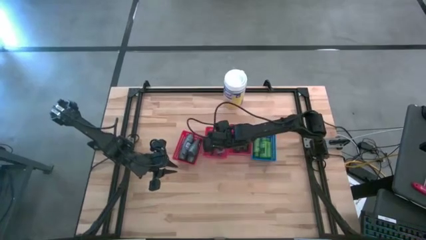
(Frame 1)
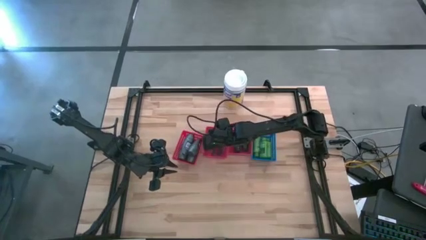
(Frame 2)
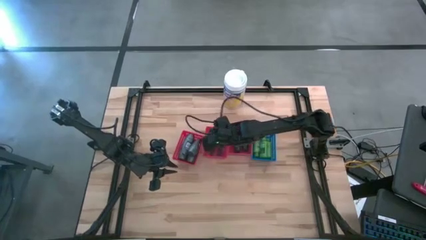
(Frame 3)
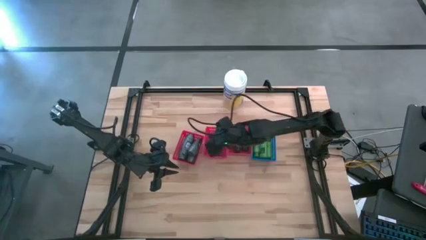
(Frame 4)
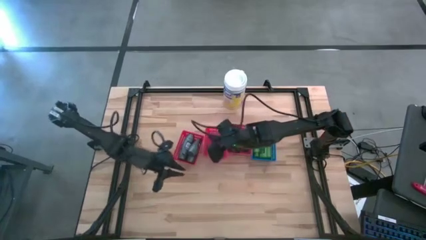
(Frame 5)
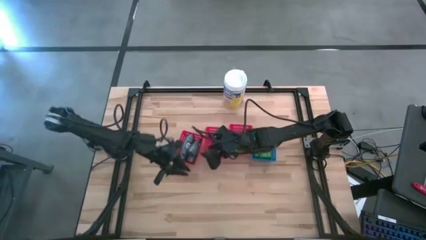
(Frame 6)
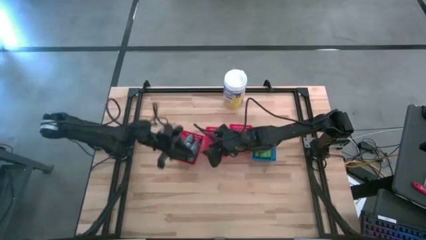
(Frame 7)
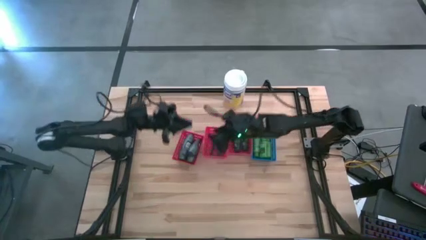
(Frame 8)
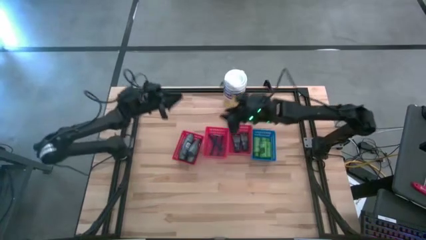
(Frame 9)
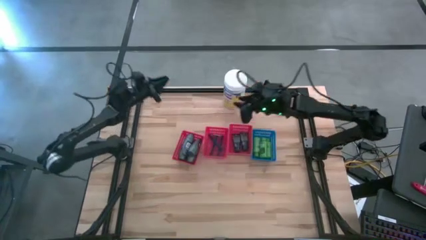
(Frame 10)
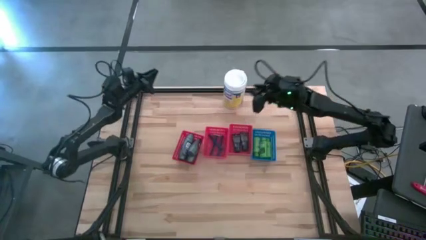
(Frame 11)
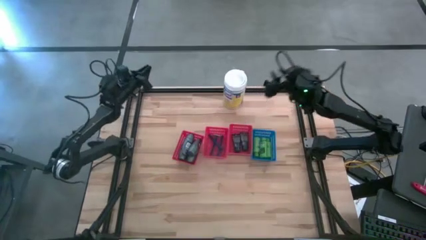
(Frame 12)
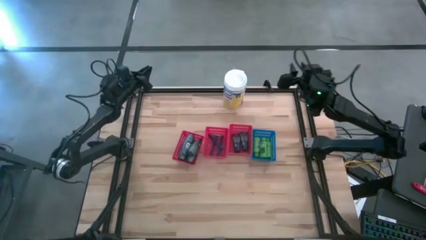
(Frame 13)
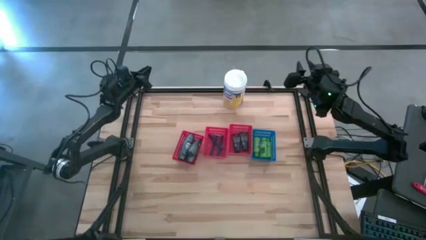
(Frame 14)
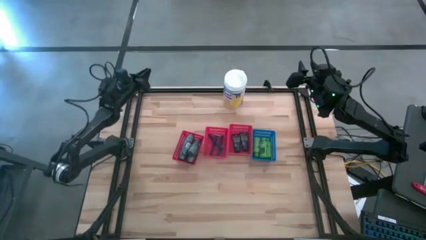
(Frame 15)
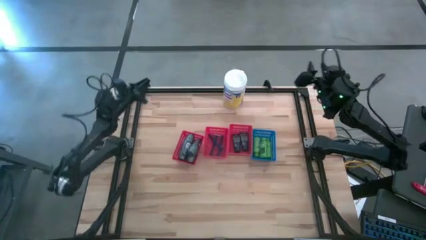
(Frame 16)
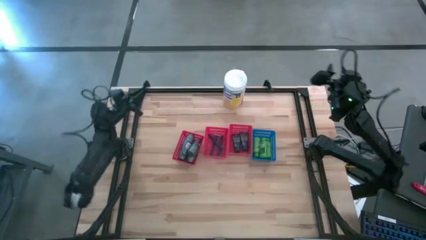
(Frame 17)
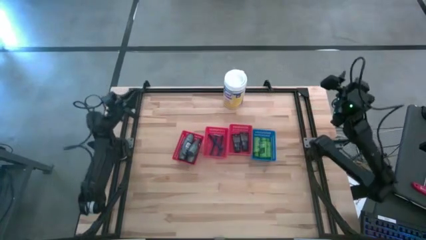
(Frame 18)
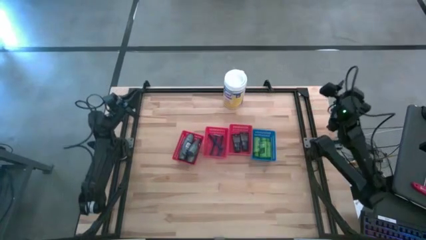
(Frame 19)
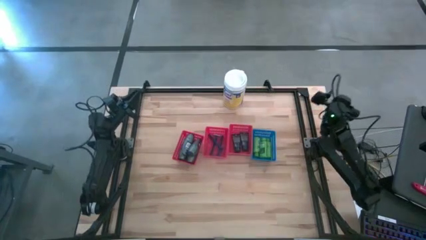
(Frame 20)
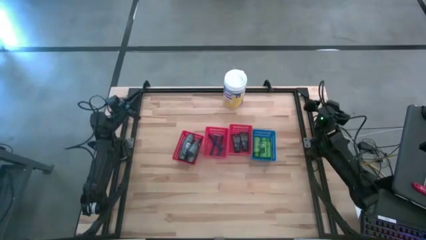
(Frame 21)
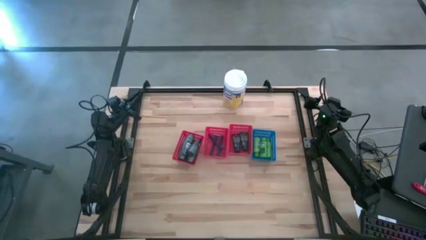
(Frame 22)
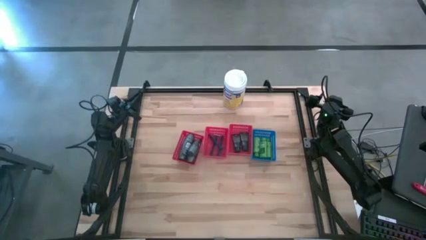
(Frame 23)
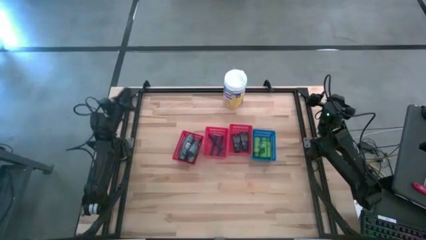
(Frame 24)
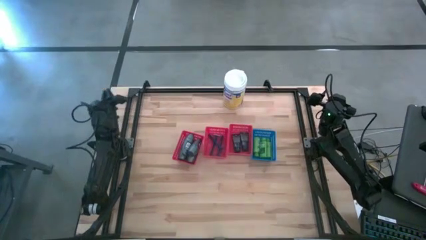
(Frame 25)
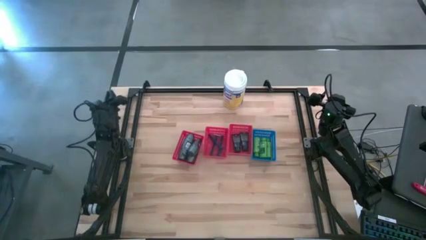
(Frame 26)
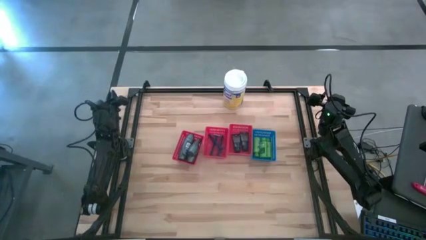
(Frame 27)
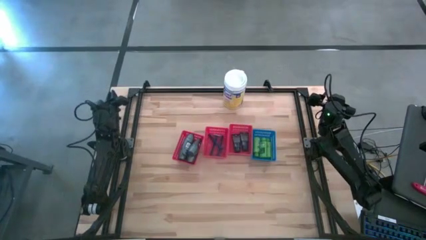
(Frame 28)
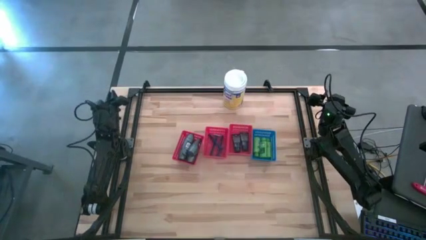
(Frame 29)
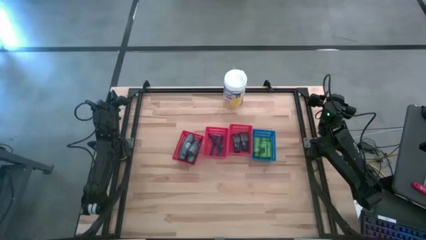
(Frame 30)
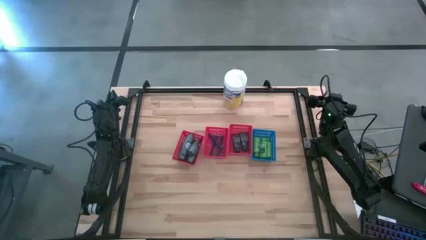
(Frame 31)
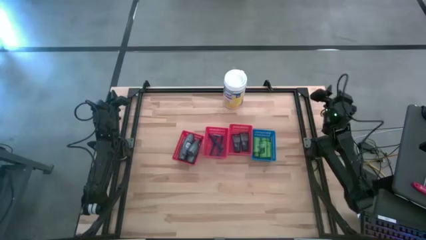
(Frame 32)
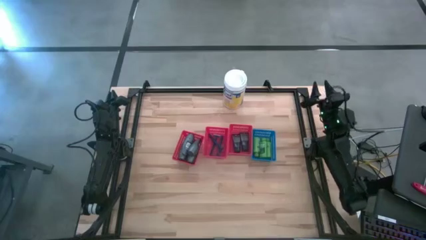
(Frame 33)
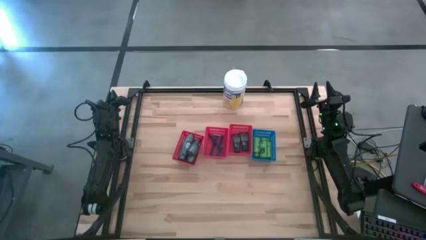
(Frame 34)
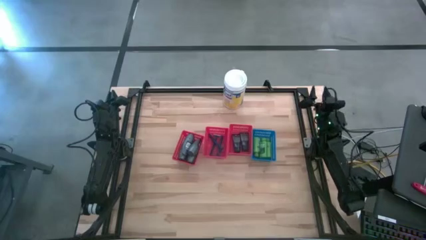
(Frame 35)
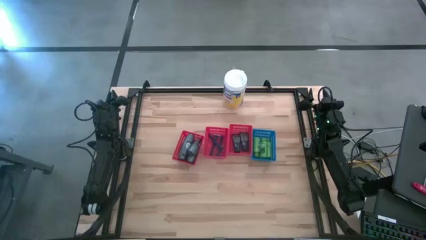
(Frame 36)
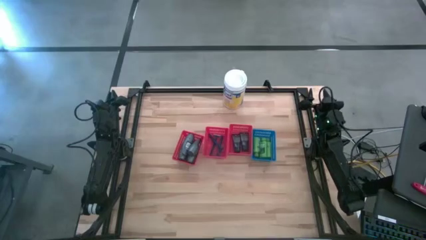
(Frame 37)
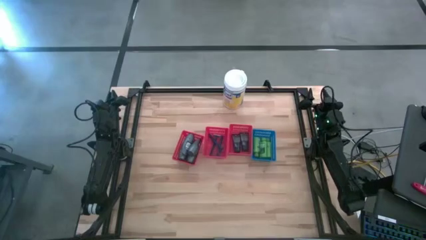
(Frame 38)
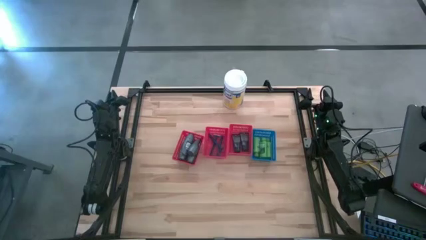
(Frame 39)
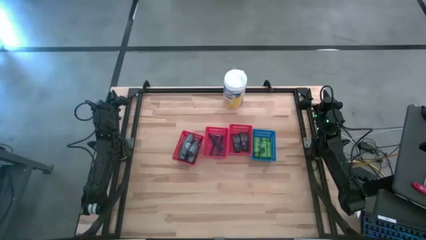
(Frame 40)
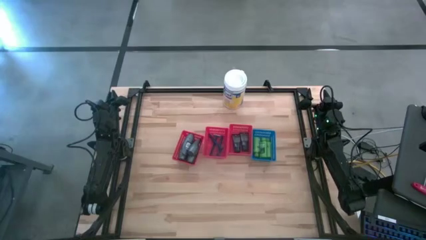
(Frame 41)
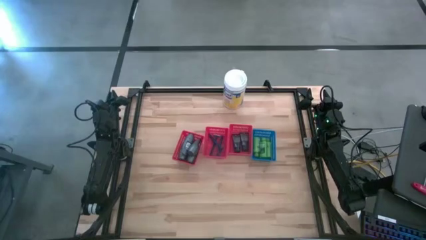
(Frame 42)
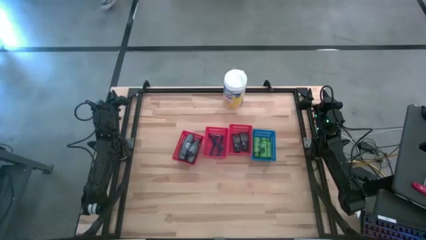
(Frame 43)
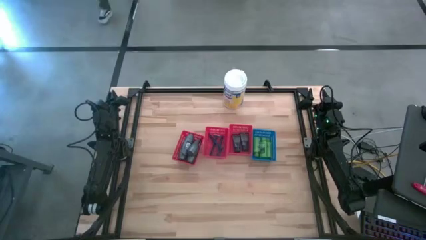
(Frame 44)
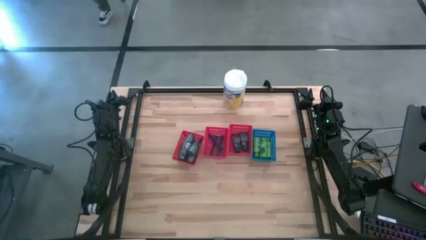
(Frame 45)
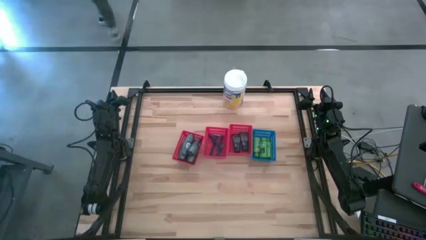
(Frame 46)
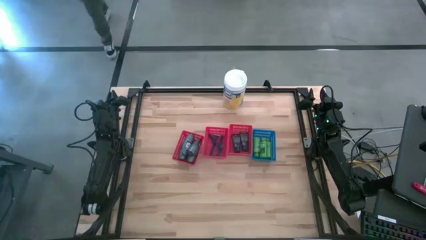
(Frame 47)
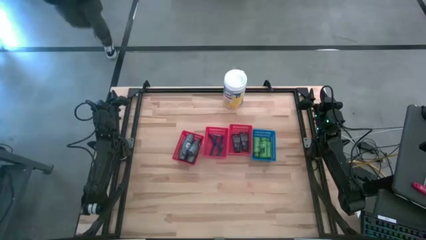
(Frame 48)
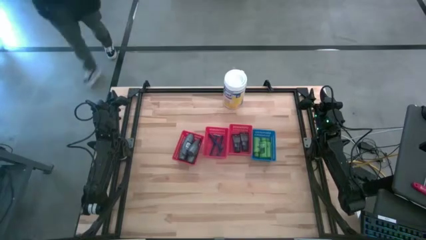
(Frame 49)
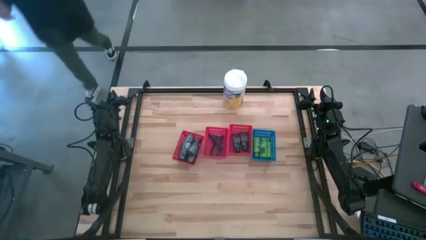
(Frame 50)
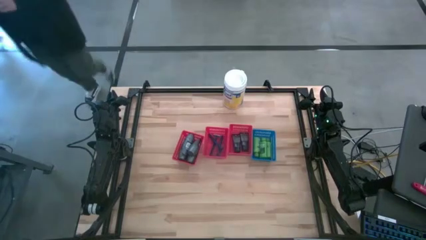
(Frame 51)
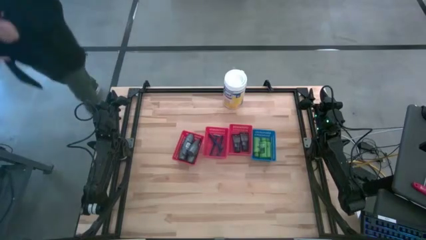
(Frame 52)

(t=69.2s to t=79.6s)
Task: Pick & Place Travel size toiletries
Return to Home Position
